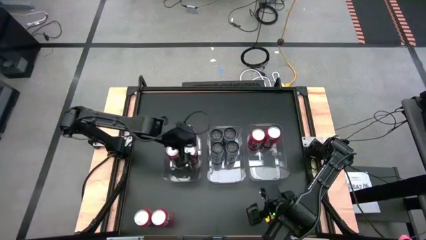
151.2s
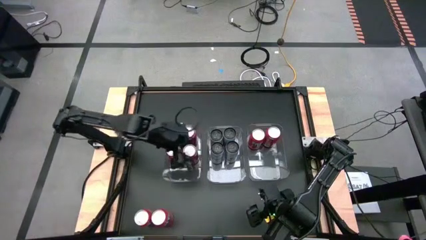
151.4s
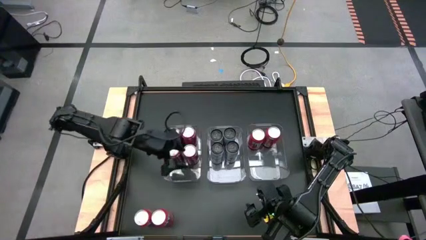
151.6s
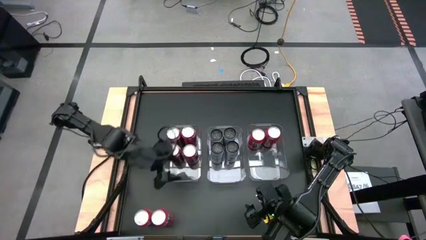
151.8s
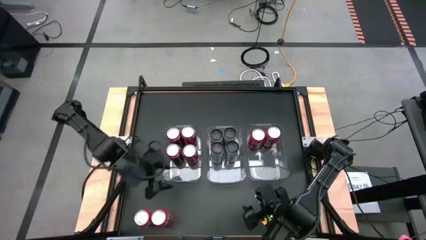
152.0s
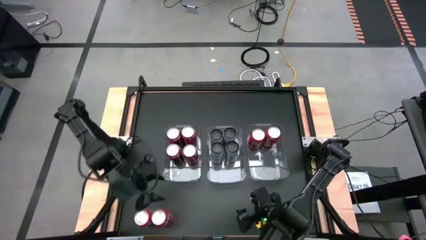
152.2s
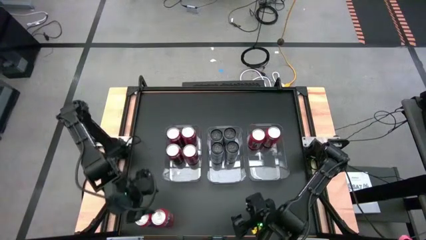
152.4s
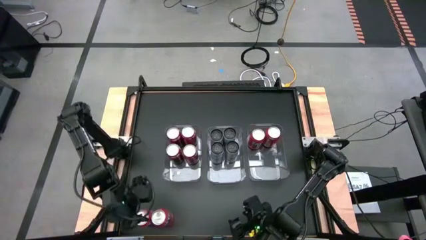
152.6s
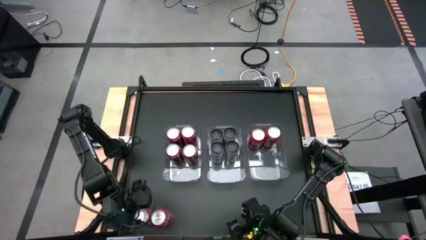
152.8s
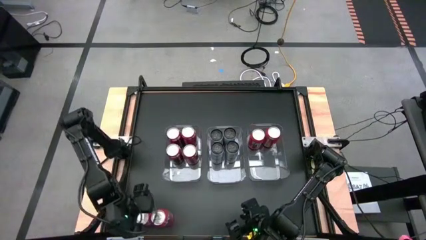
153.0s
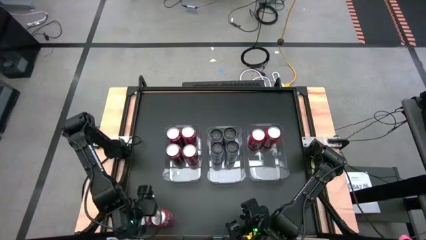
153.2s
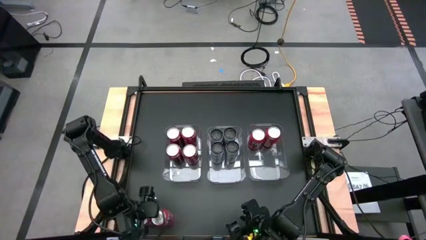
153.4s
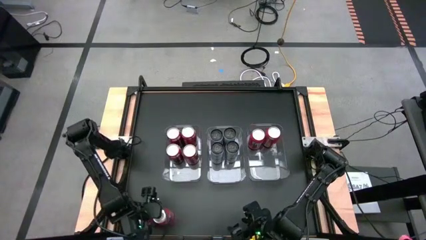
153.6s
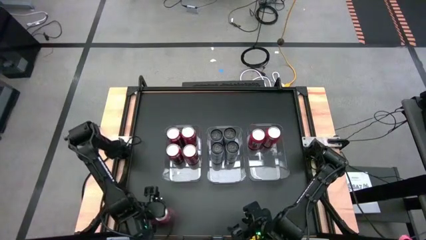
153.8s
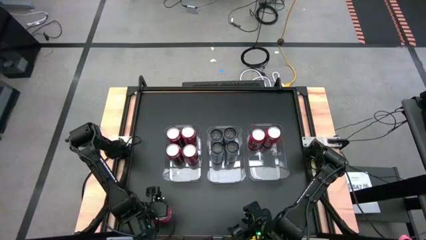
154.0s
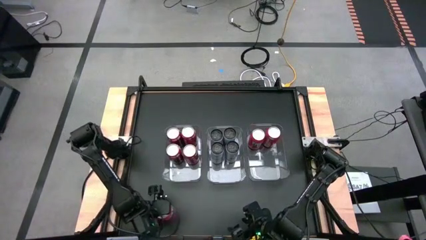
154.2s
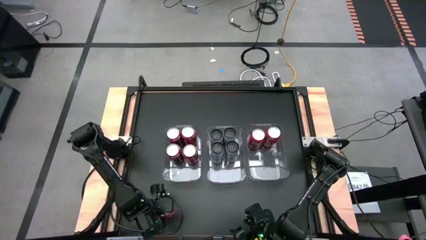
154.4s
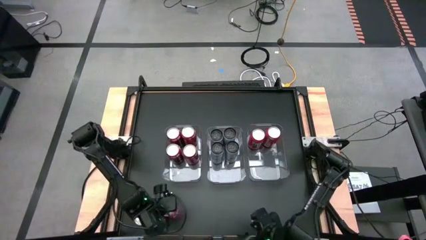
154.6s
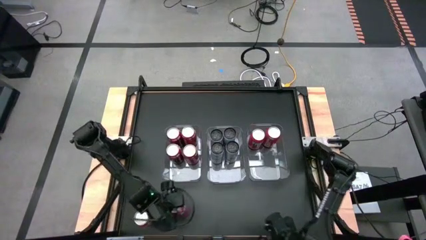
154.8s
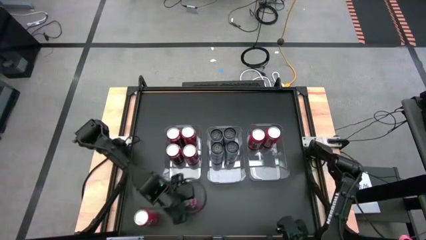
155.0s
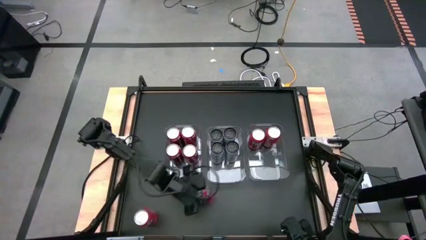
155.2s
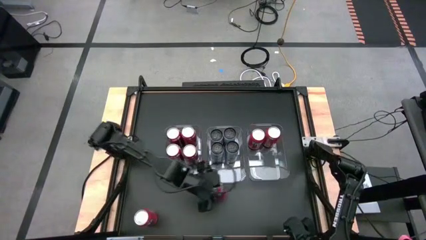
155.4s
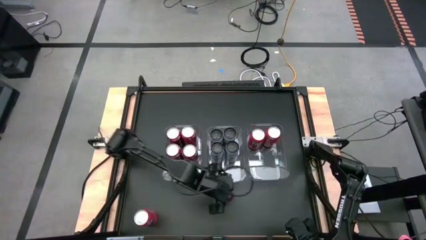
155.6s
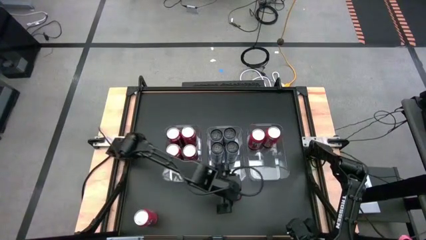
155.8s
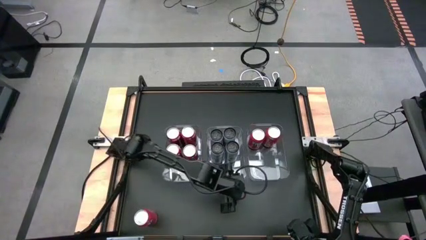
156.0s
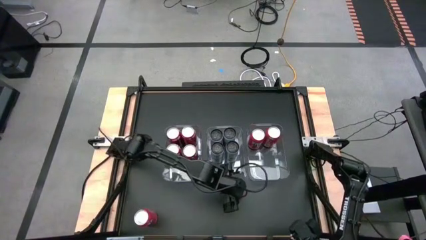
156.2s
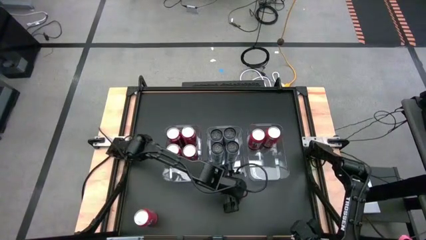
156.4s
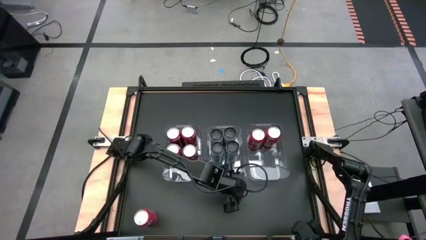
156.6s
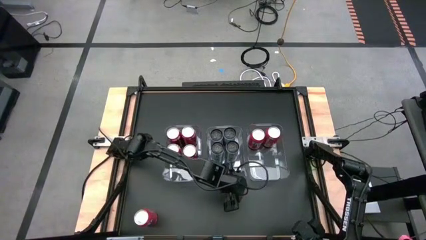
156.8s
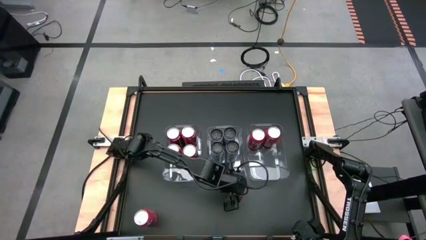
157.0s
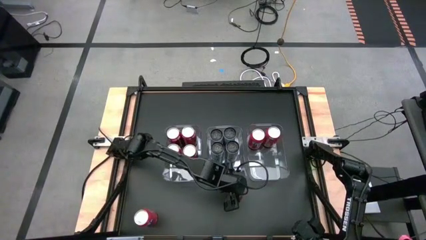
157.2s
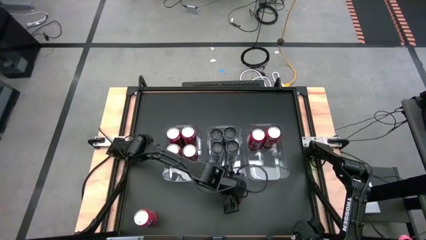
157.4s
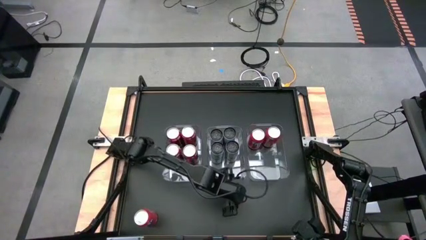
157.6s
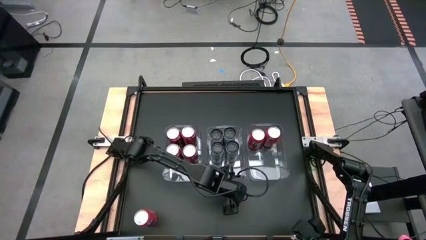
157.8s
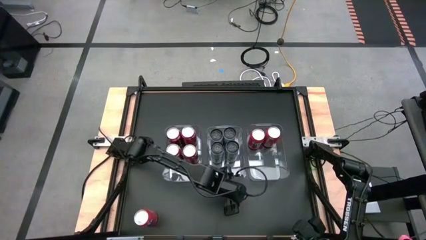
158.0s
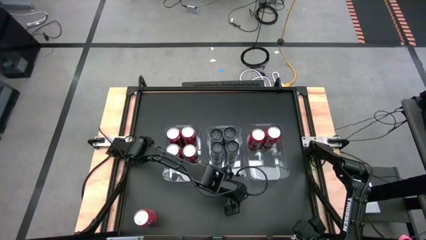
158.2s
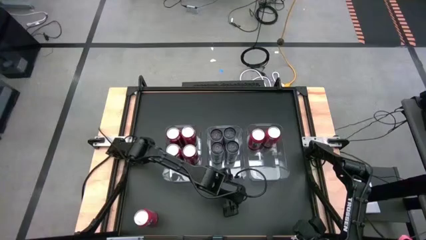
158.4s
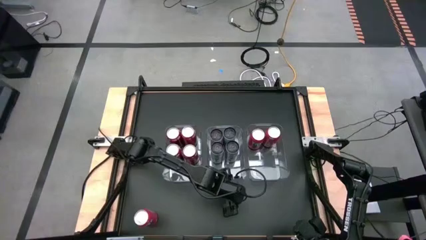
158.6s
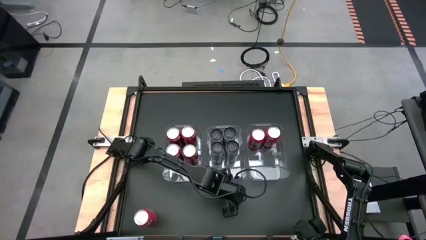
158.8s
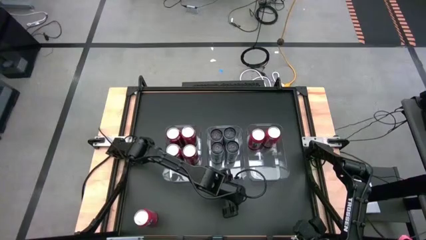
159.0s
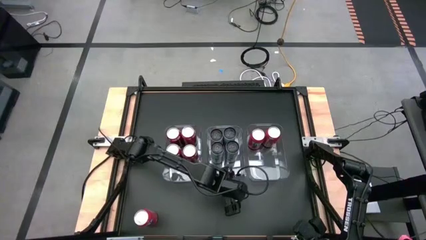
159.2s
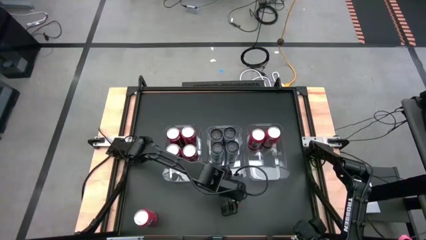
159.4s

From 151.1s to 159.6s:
Task: Sort soda cans
Move the right orange soda can to the center

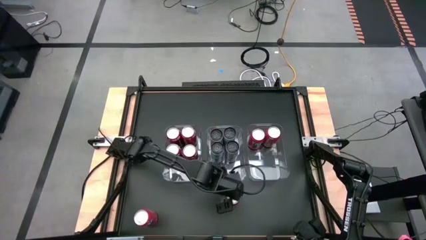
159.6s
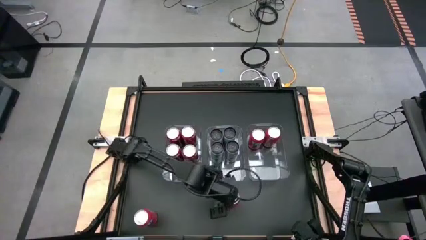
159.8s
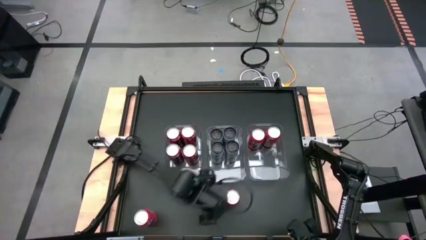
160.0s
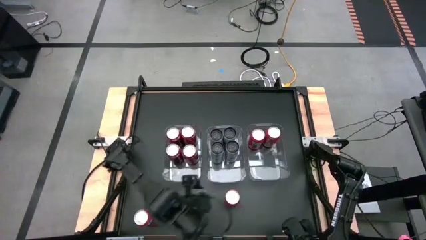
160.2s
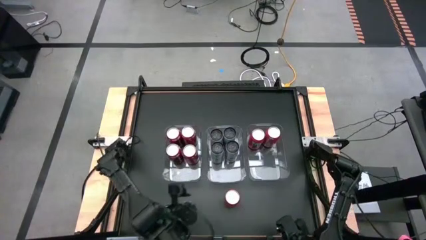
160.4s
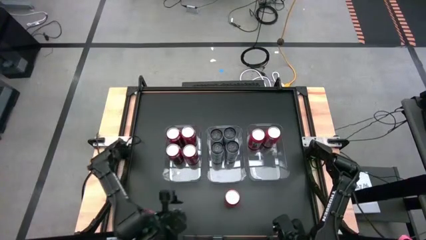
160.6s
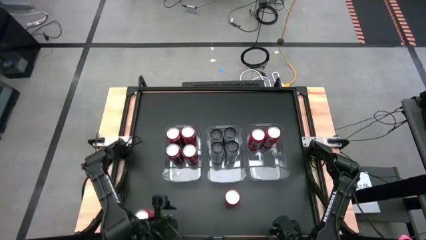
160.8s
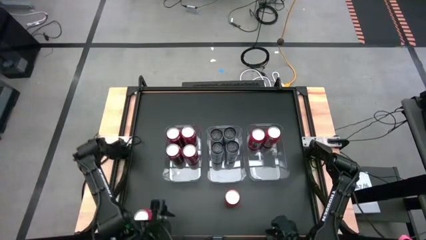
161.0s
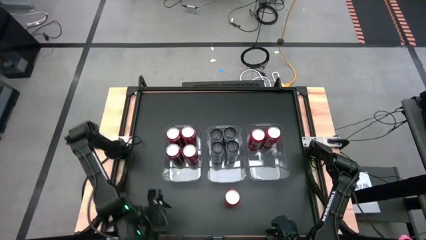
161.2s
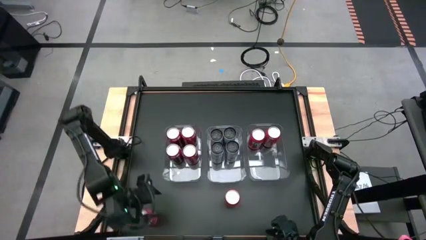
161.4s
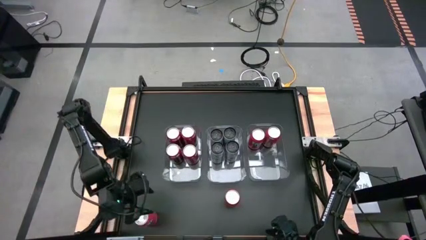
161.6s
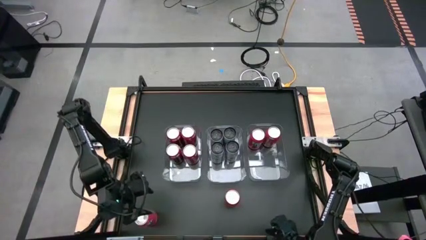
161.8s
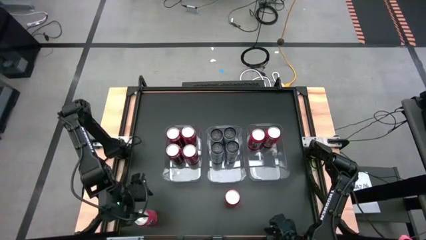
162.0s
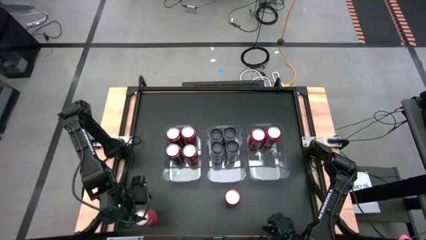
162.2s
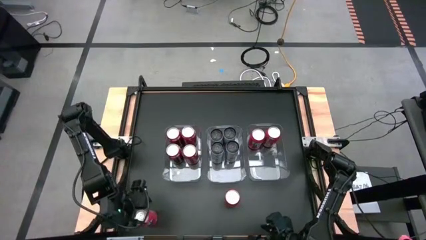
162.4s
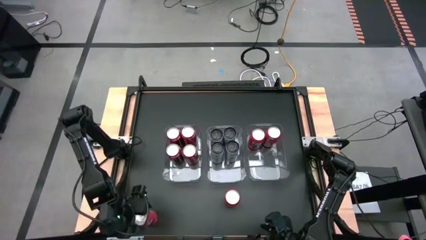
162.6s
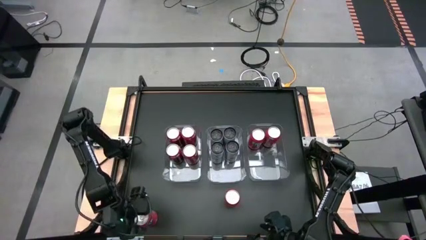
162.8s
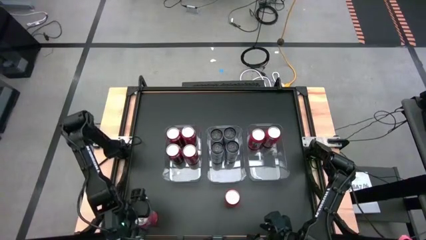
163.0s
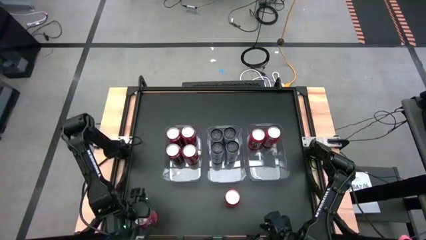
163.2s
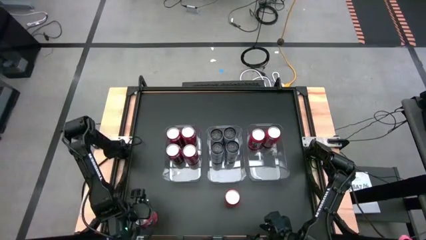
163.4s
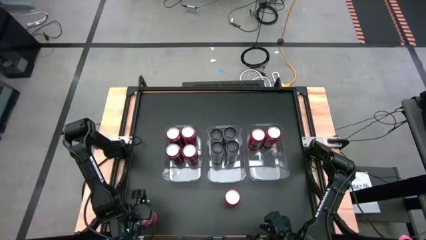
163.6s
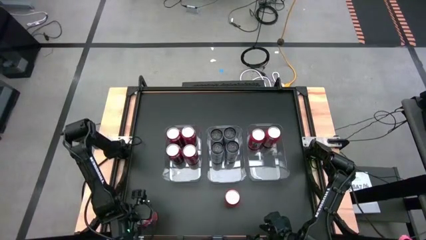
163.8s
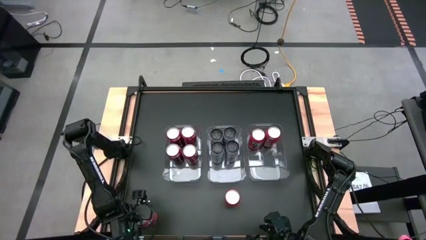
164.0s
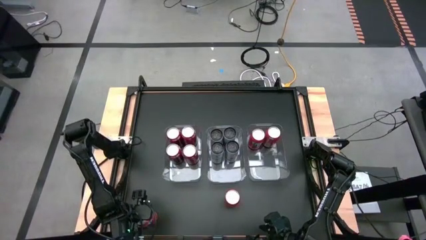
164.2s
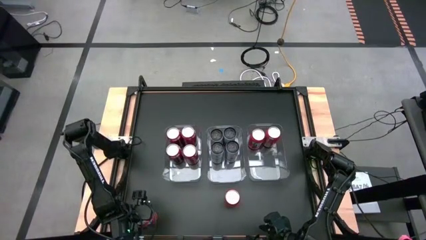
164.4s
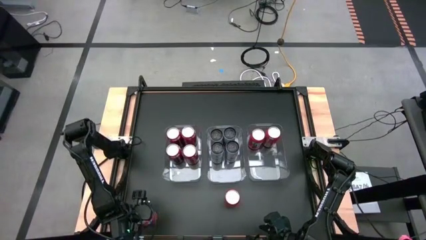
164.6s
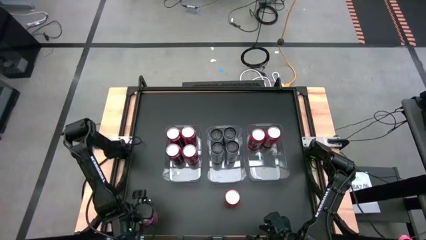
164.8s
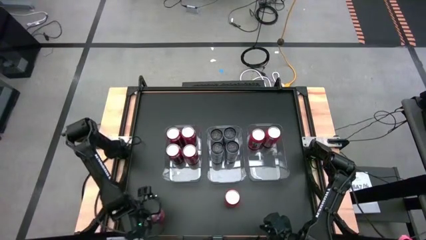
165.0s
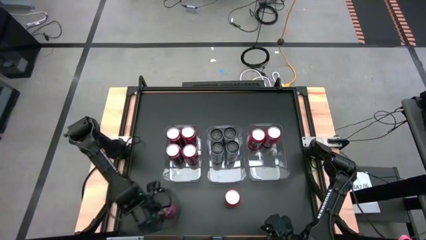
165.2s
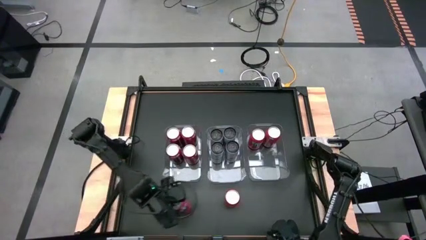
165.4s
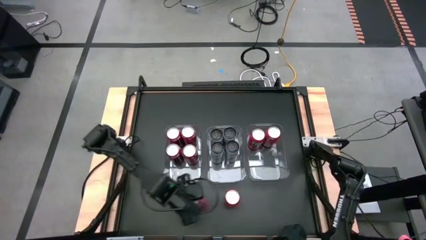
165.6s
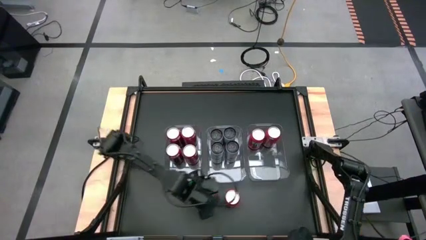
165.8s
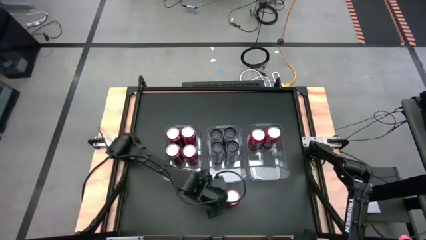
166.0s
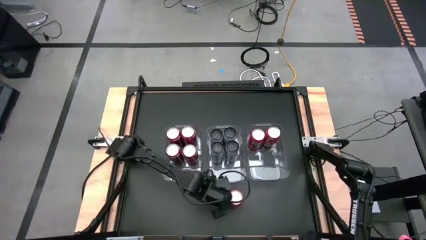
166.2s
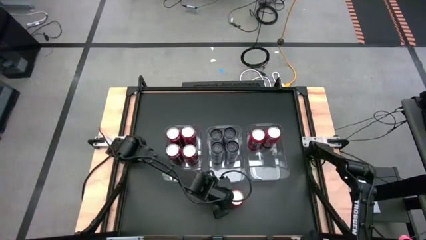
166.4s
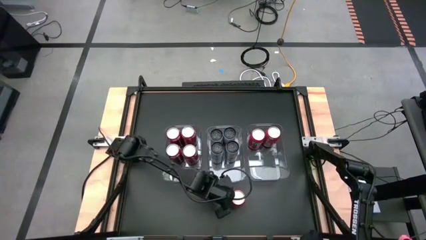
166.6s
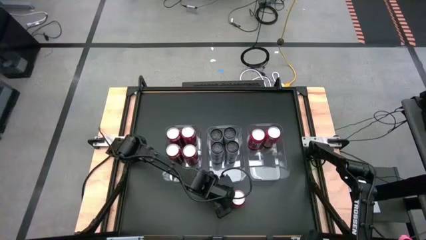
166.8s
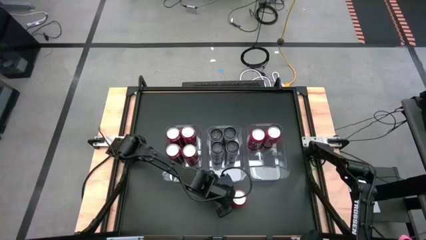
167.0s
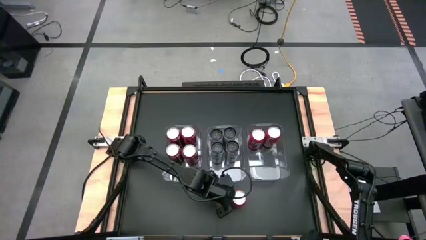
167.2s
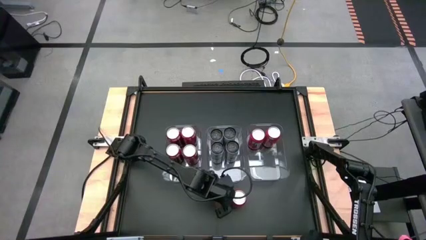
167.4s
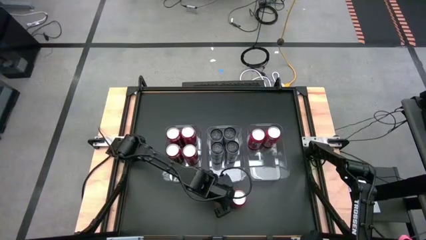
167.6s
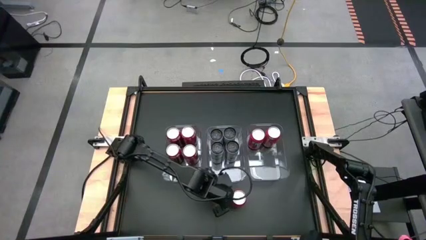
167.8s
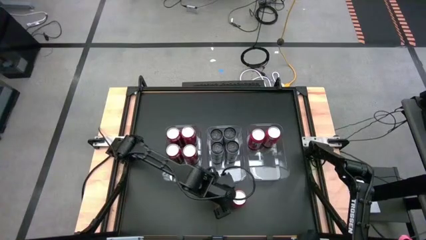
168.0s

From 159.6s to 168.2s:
Move the left orange soda can to the center
